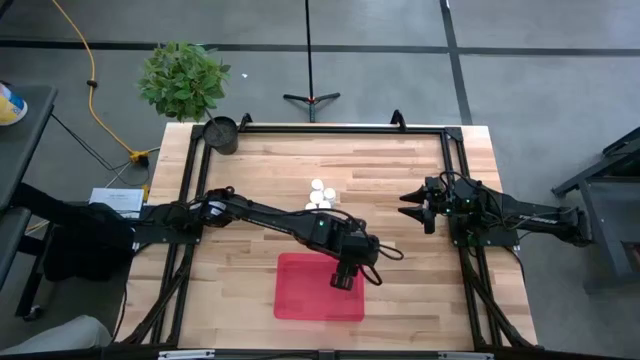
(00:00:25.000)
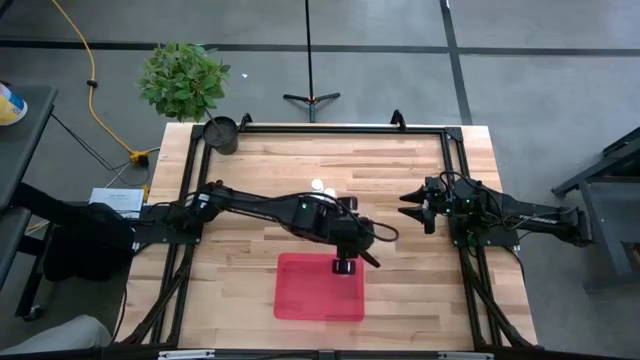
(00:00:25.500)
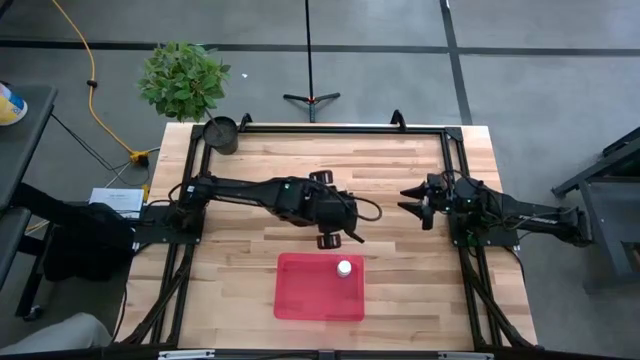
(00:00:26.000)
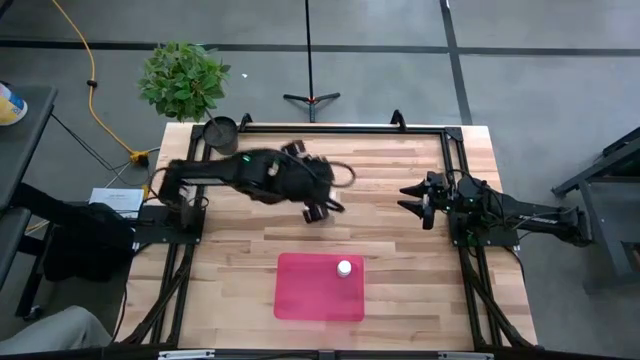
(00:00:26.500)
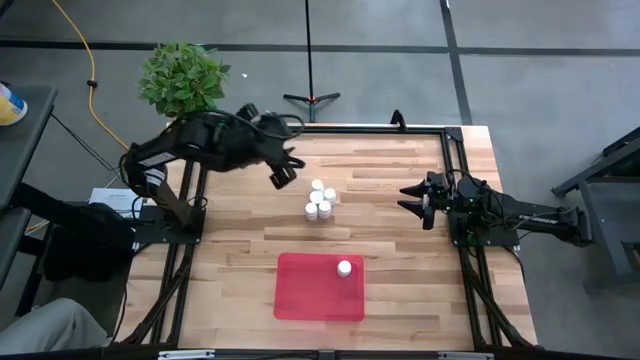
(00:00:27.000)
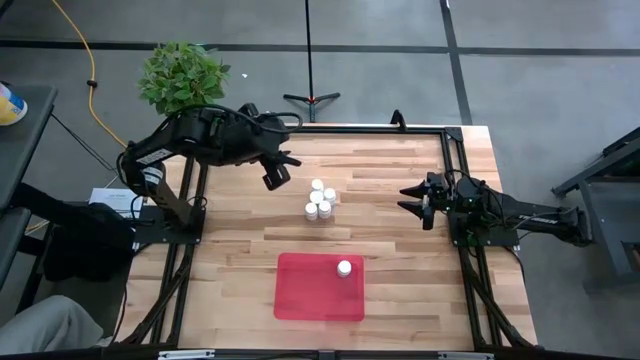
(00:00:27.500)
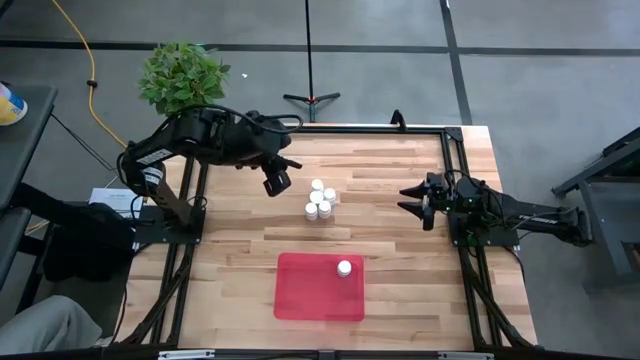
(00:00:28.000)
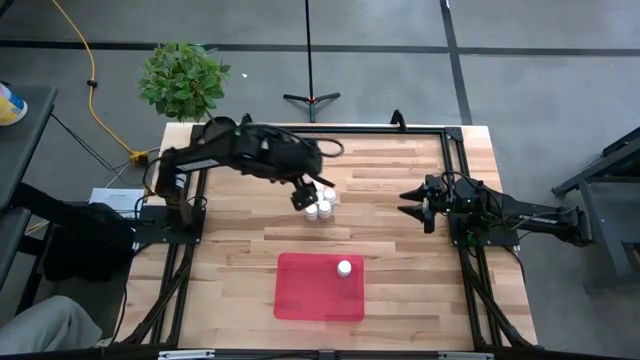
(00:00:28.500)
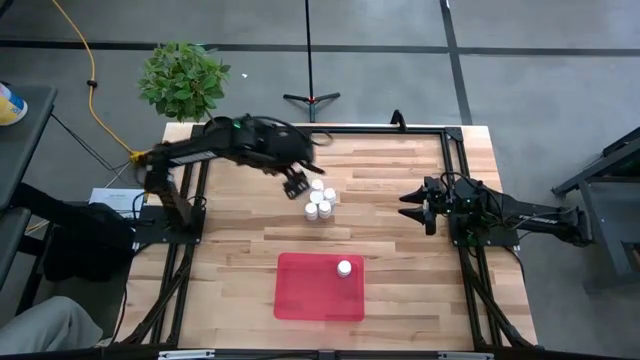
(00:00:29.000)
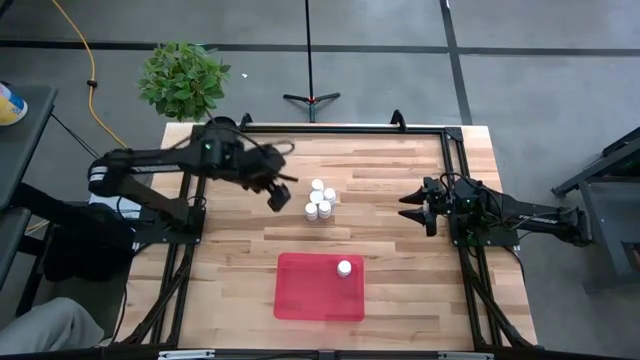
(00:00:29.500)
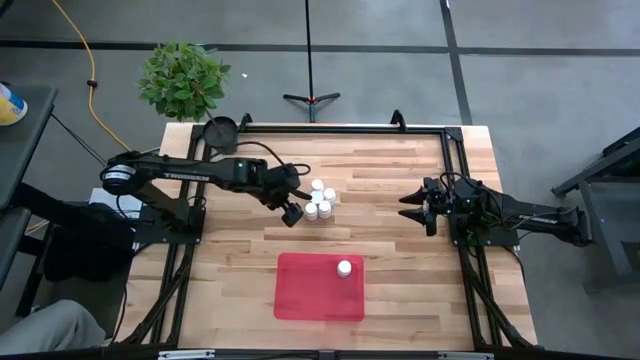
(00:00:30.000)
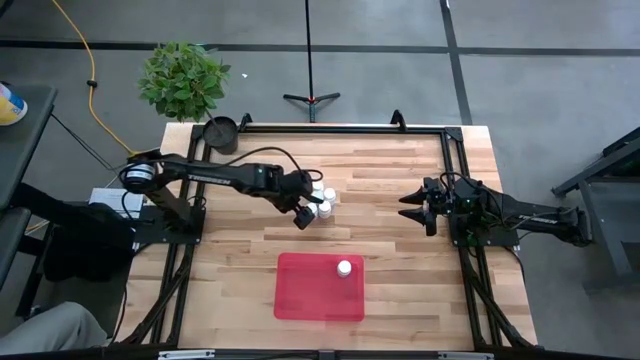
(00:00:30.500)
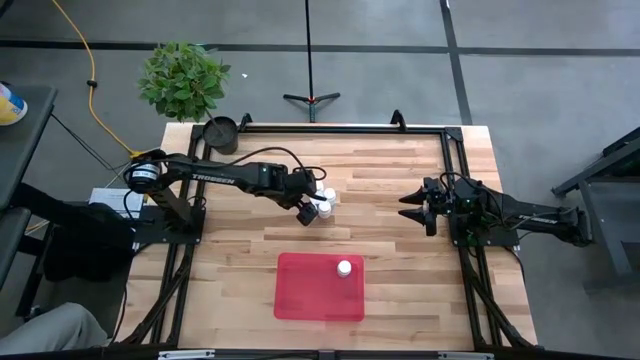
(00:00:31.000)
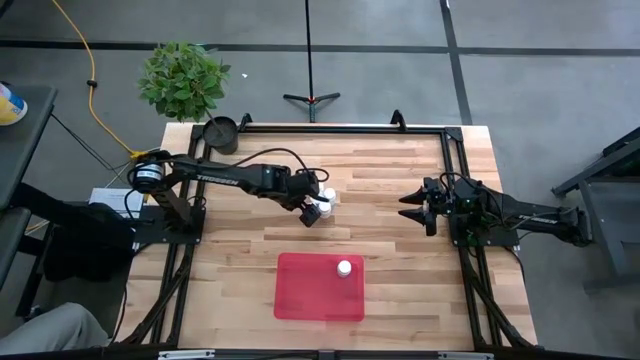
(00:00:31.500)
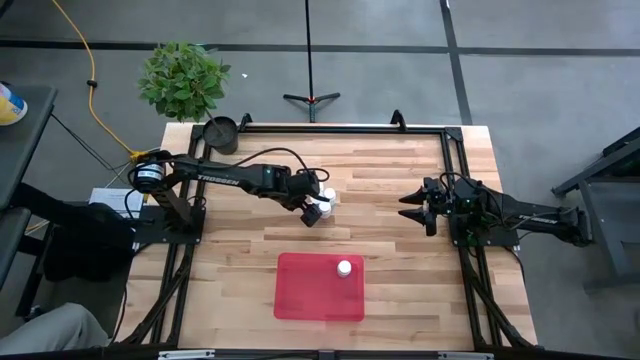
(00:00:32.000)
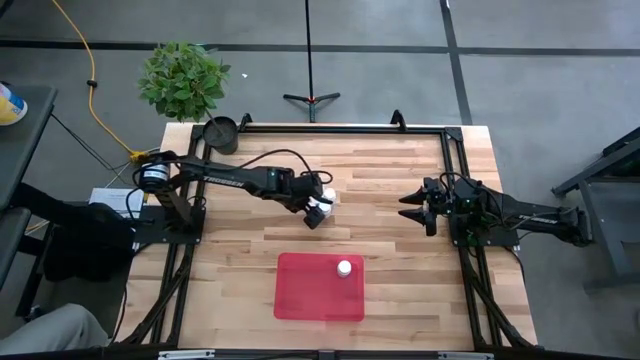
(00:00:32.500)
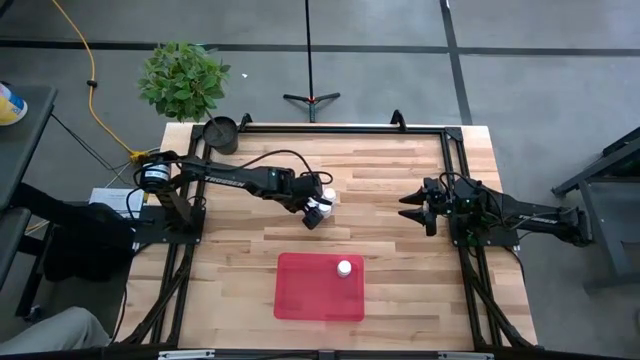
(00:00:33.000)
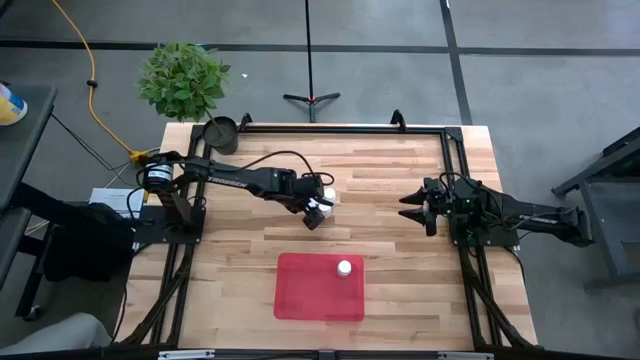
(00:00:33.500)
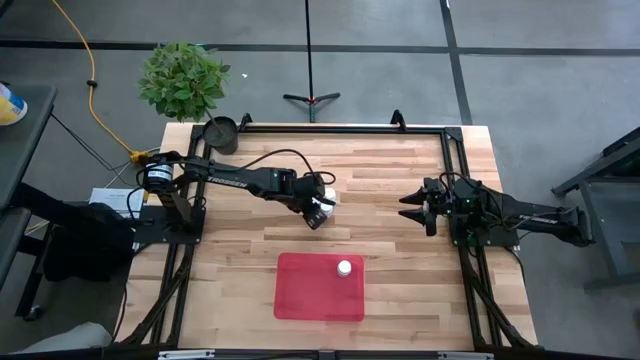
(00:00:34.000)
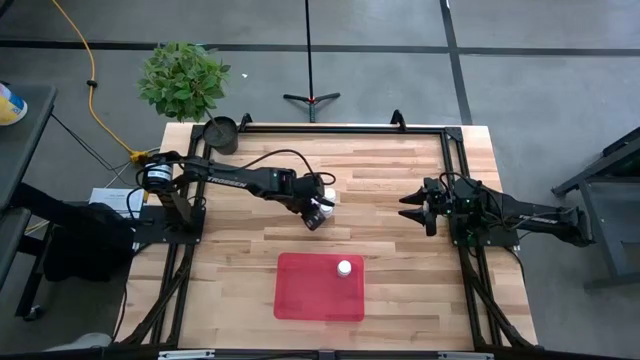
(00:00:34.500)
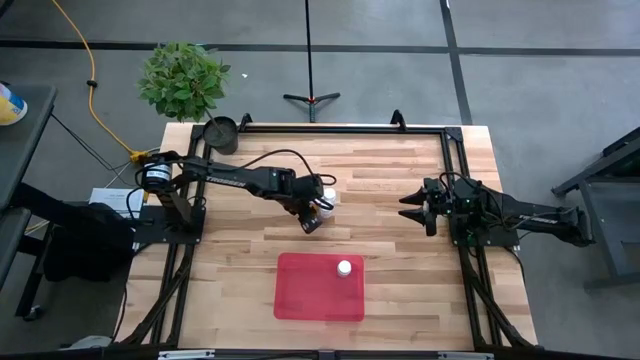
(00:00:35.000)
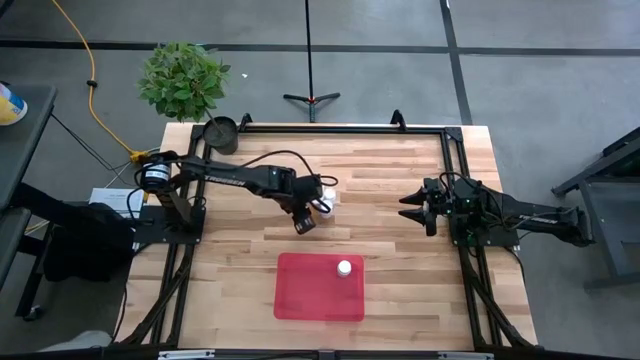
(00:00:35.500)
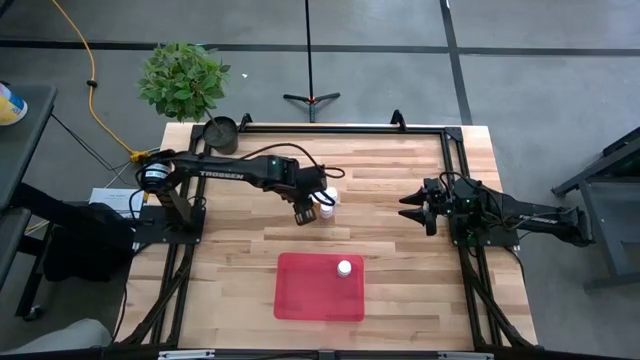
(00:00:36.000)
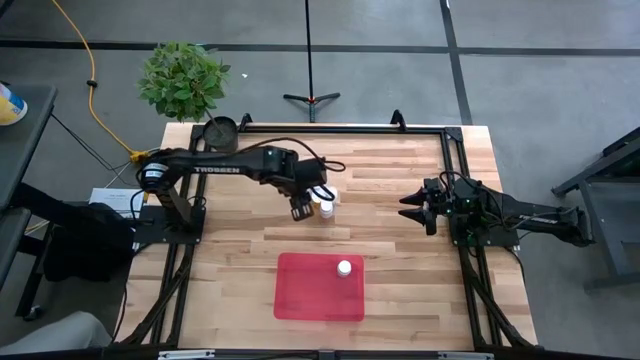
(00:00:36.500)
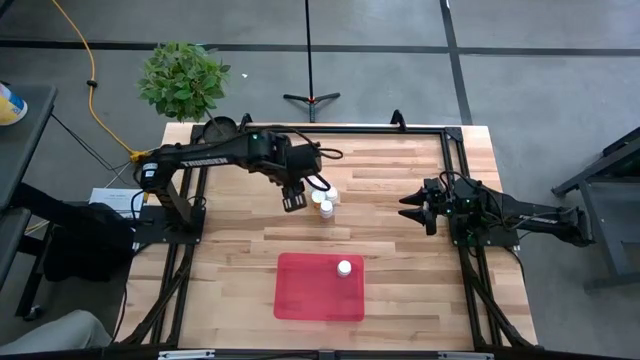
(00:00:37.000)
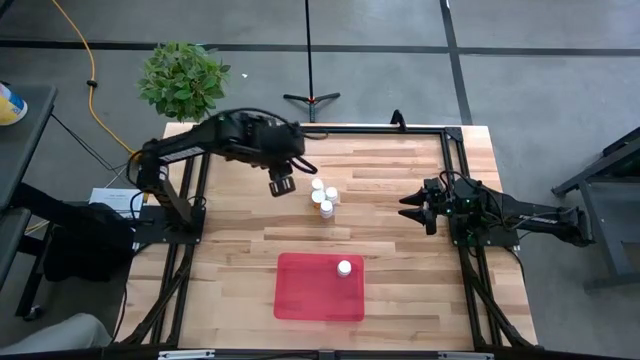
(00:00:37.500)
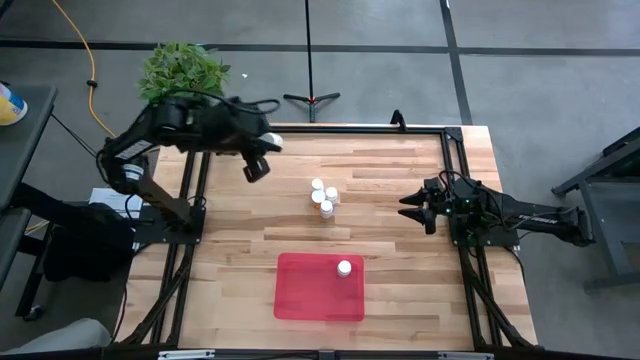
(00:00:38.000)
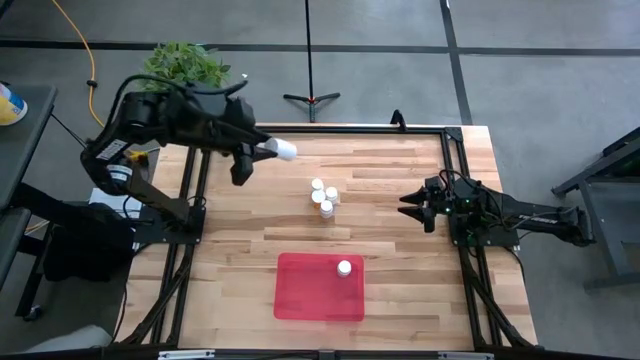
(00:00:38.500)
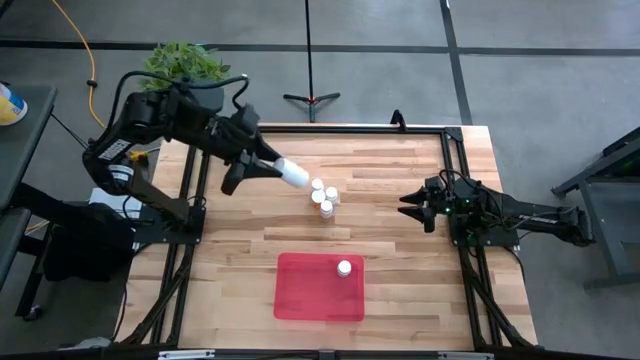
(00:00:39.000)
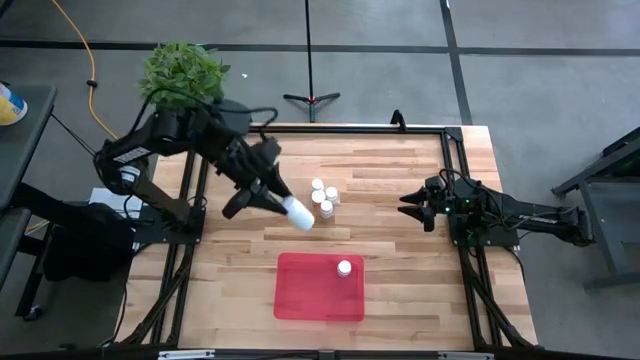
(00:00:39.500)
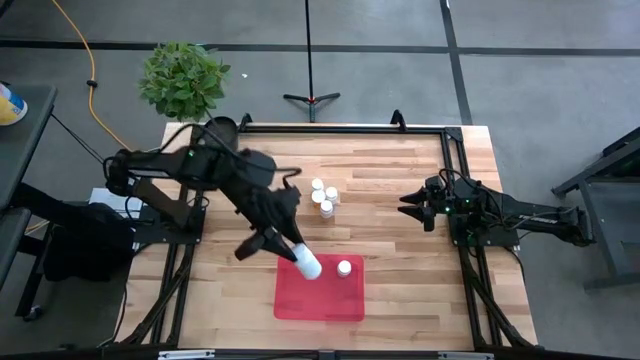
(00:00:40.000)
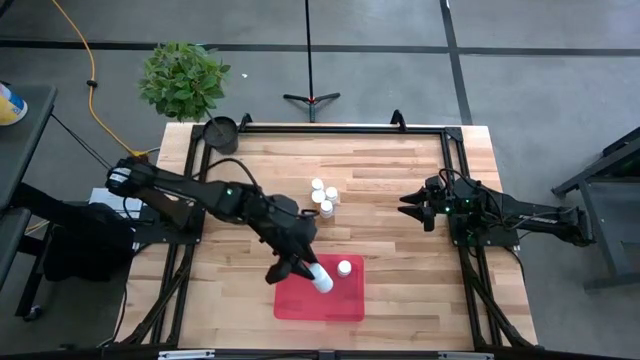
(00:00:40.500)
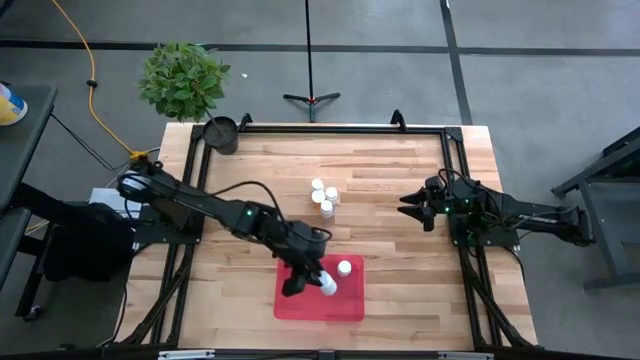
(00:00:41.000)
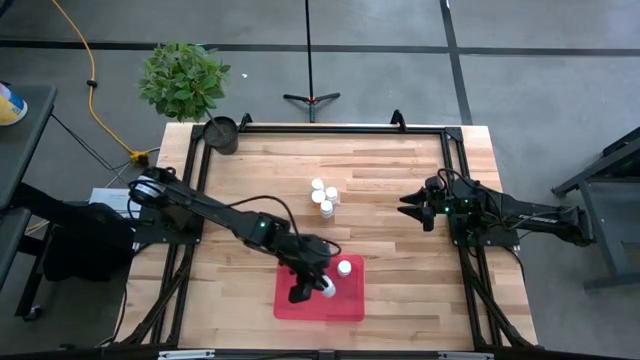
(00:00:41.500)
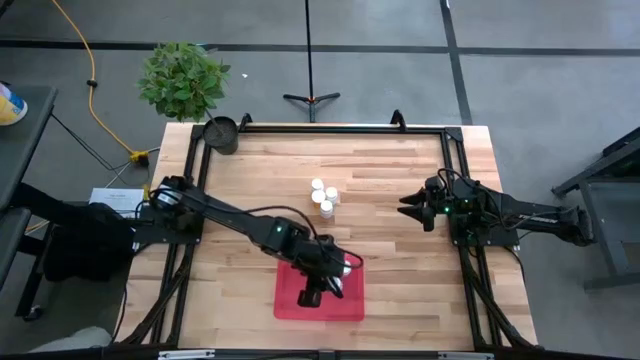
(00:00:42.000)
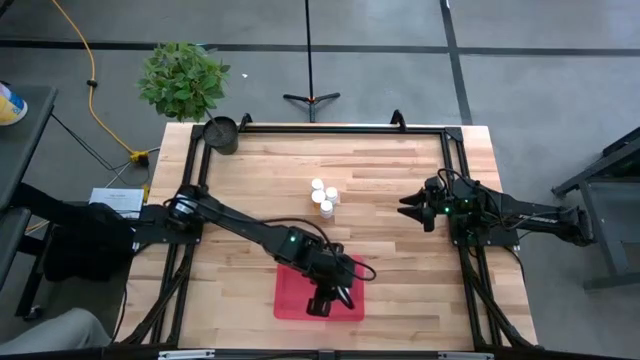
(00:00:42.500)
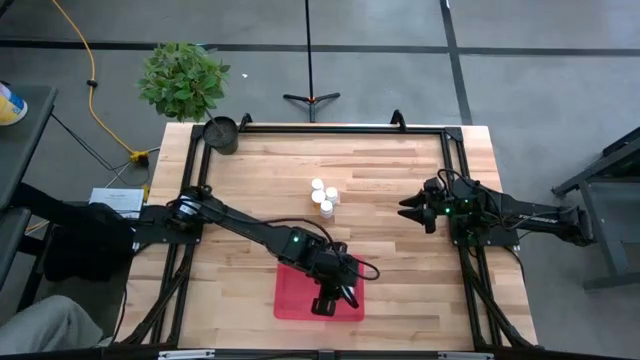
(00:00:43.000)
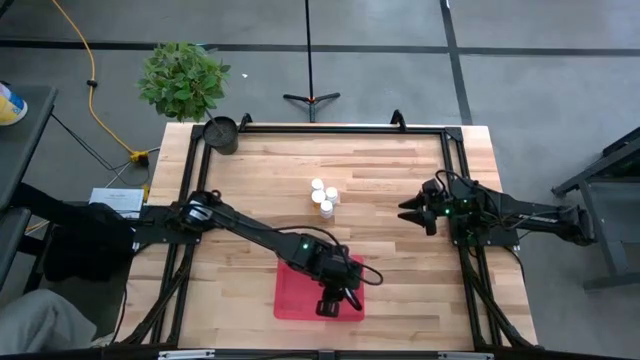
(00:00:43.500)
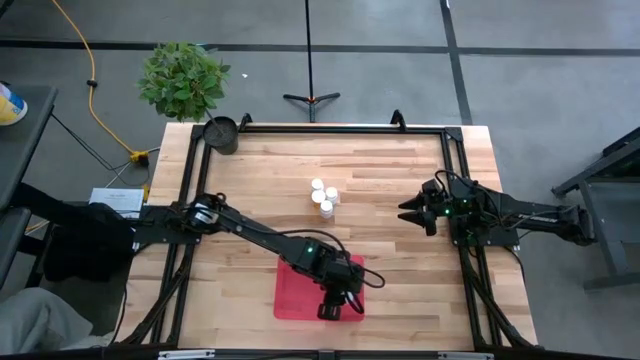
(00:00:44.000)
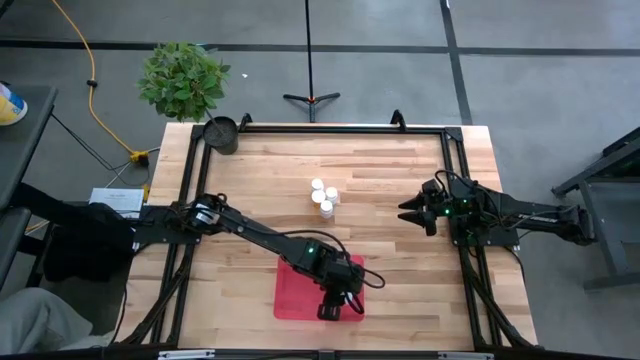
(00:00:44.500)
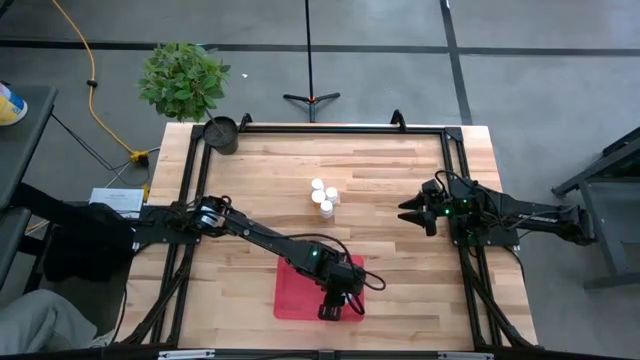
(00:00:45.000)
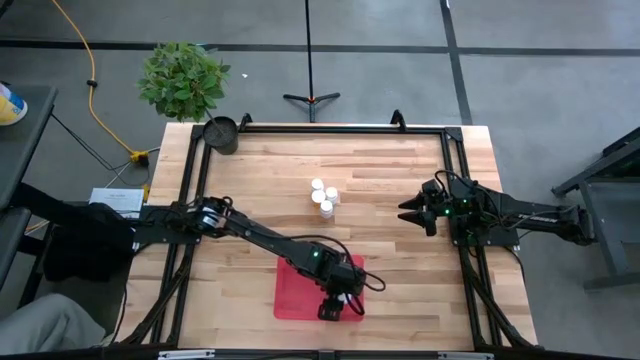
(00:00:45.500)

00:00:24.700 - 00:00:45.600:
Task: Pick and place pill bottles into a basket
Put the white pill bottle into the red bin
